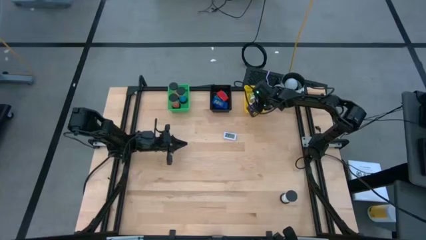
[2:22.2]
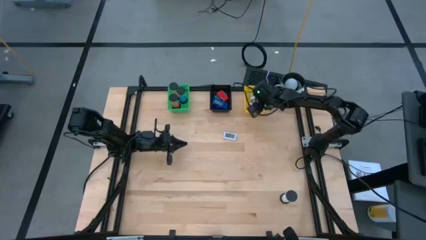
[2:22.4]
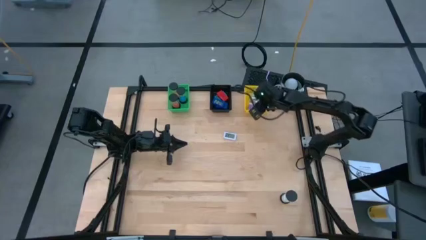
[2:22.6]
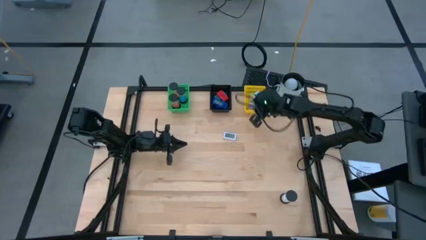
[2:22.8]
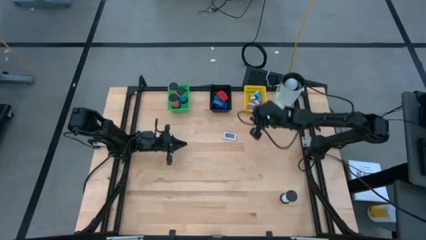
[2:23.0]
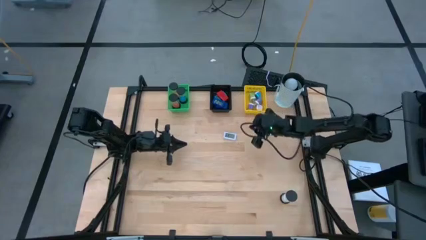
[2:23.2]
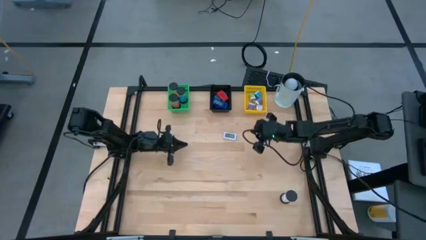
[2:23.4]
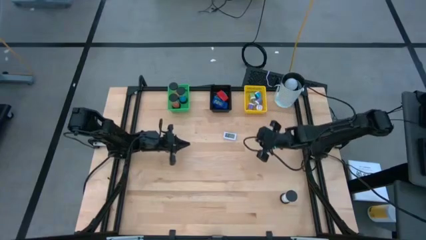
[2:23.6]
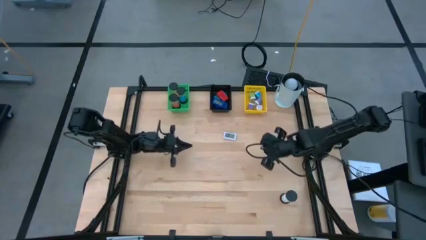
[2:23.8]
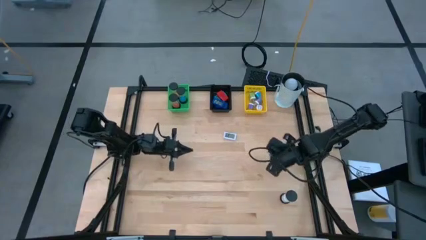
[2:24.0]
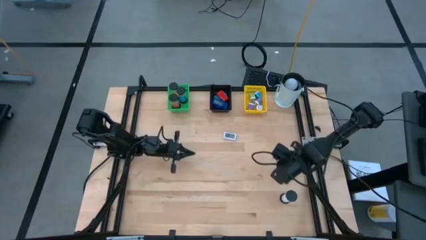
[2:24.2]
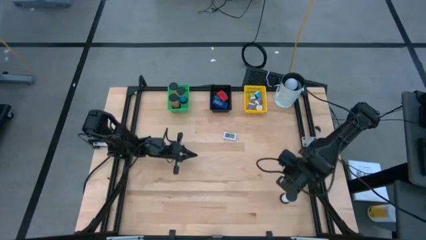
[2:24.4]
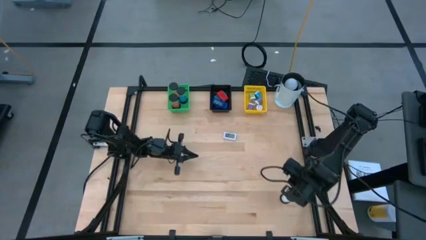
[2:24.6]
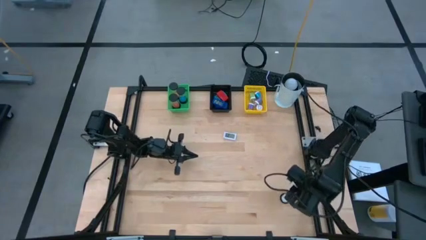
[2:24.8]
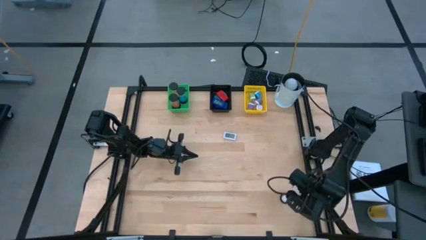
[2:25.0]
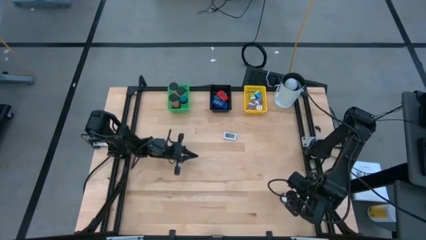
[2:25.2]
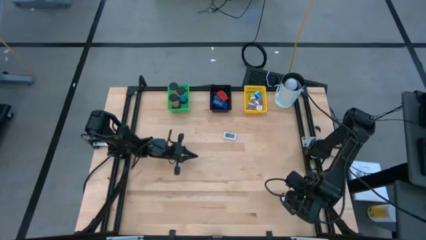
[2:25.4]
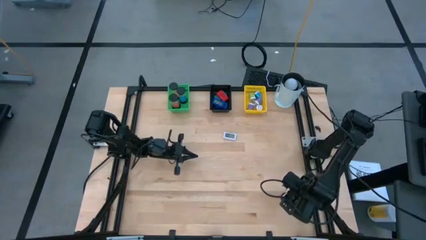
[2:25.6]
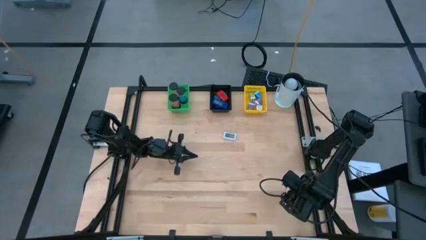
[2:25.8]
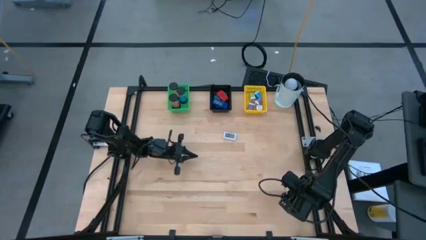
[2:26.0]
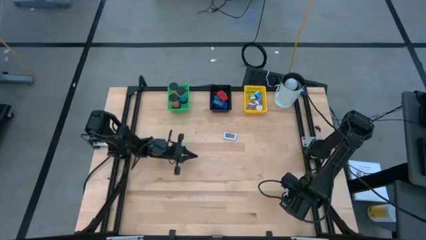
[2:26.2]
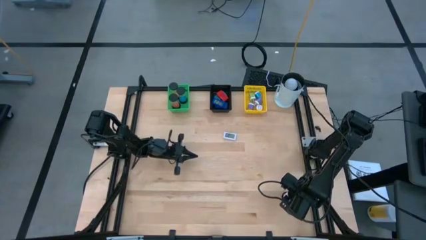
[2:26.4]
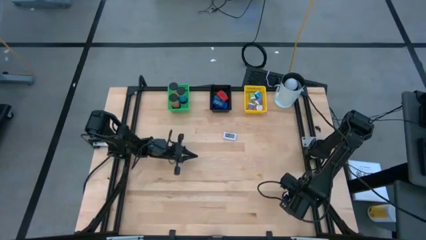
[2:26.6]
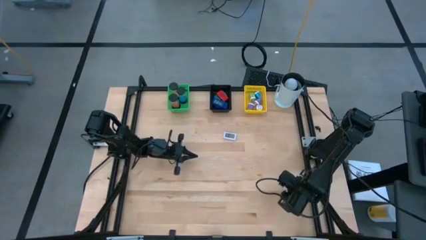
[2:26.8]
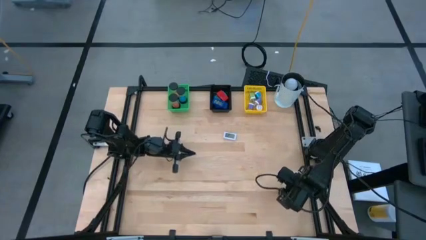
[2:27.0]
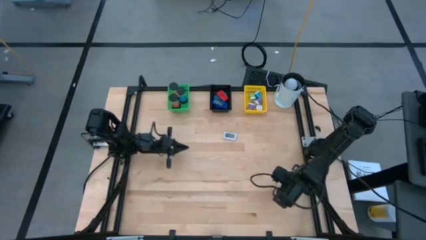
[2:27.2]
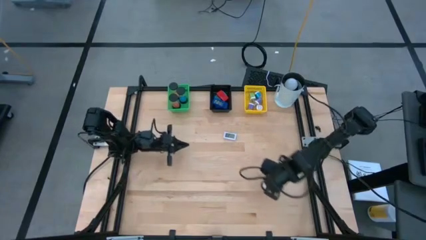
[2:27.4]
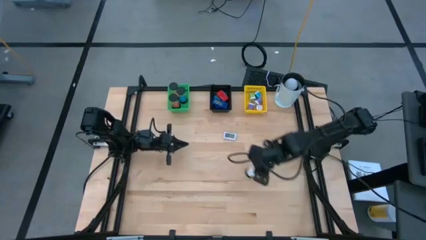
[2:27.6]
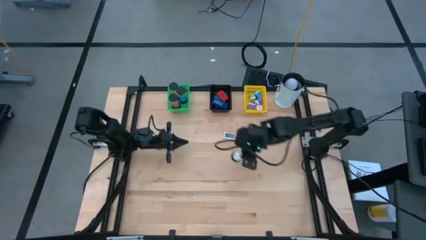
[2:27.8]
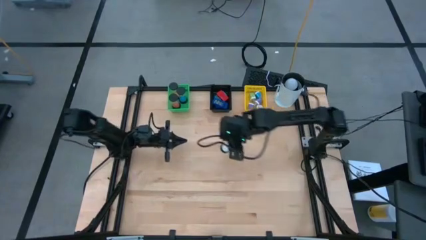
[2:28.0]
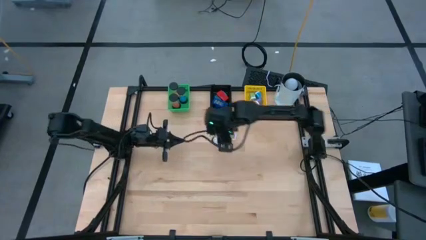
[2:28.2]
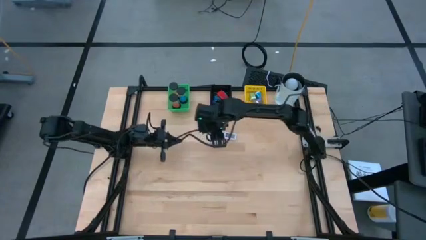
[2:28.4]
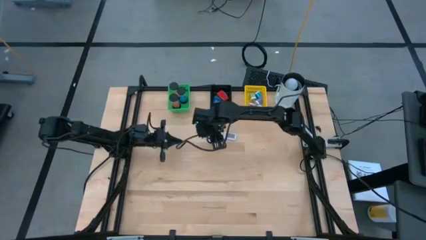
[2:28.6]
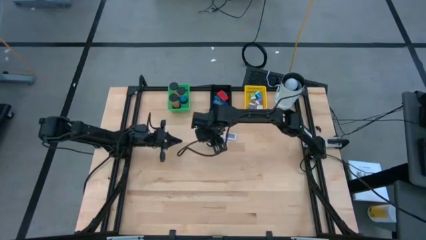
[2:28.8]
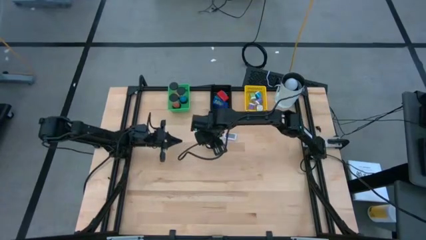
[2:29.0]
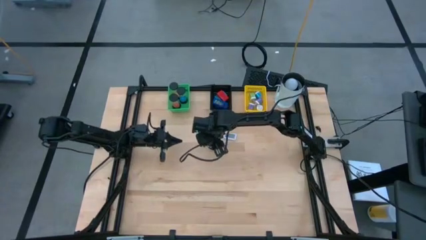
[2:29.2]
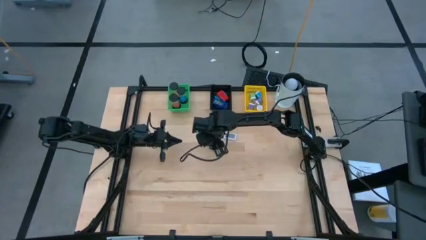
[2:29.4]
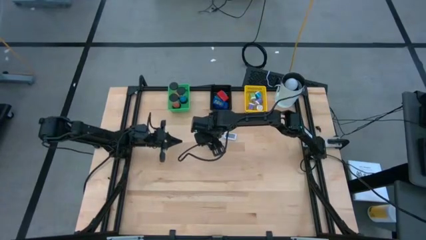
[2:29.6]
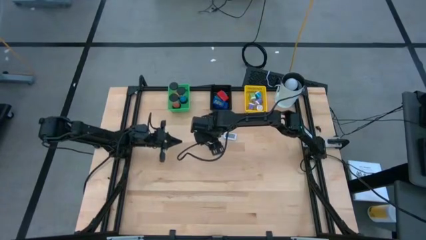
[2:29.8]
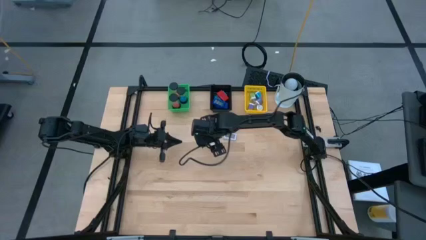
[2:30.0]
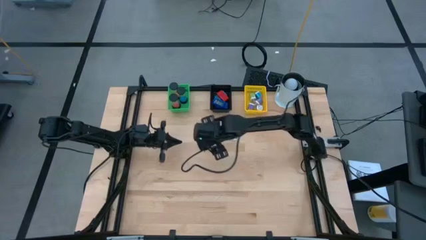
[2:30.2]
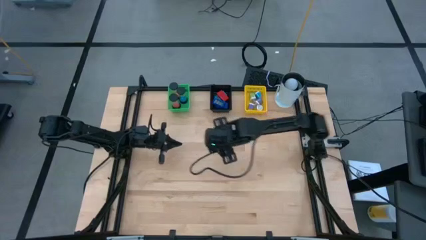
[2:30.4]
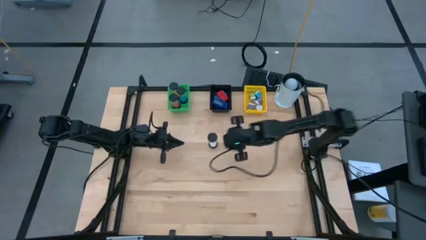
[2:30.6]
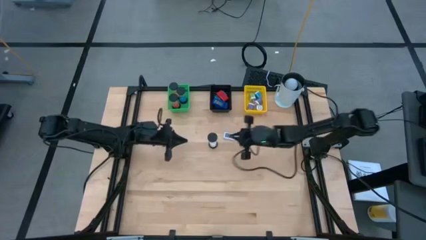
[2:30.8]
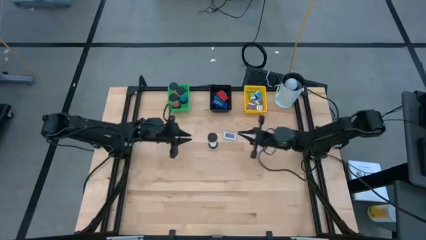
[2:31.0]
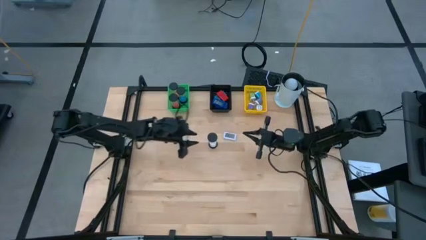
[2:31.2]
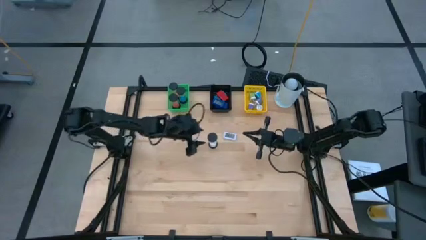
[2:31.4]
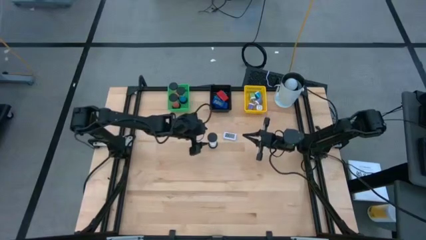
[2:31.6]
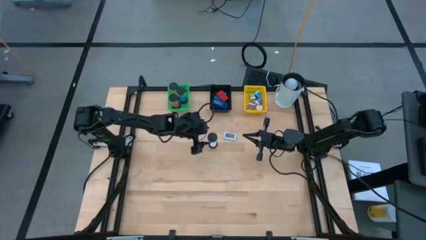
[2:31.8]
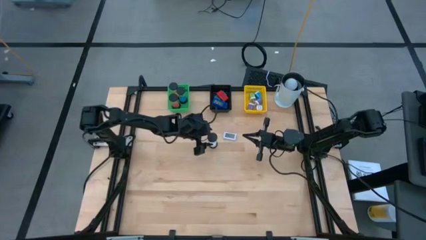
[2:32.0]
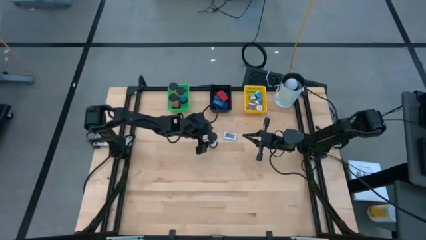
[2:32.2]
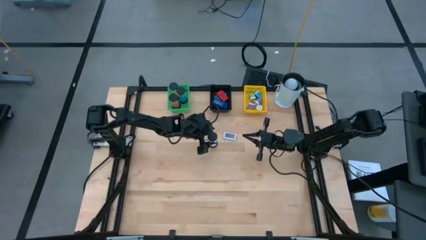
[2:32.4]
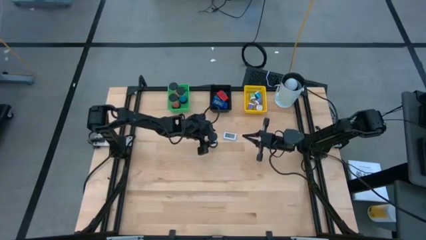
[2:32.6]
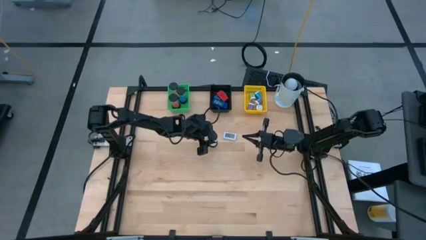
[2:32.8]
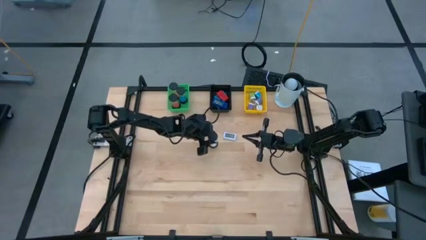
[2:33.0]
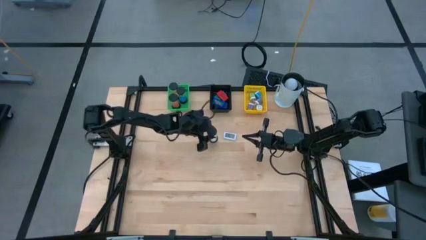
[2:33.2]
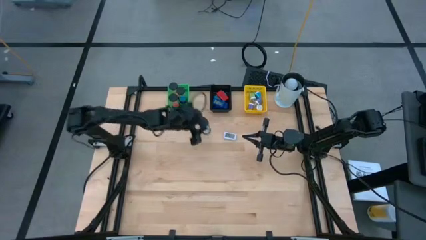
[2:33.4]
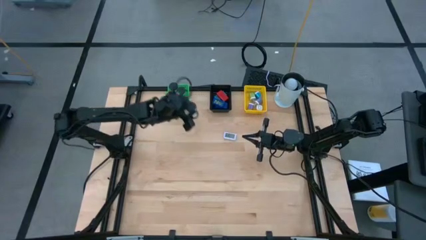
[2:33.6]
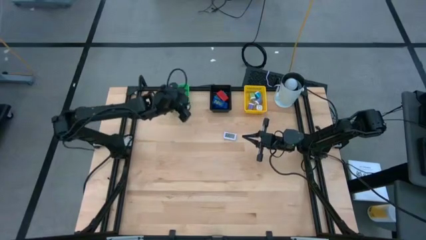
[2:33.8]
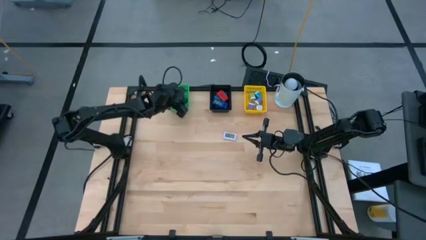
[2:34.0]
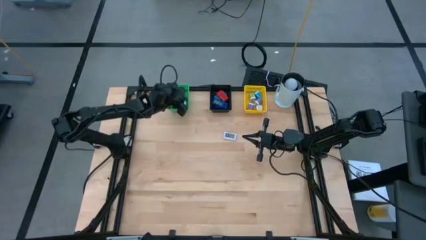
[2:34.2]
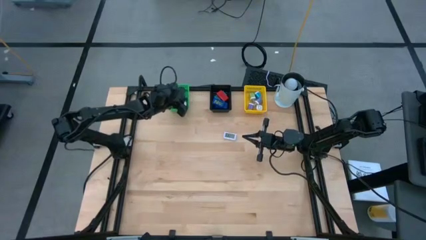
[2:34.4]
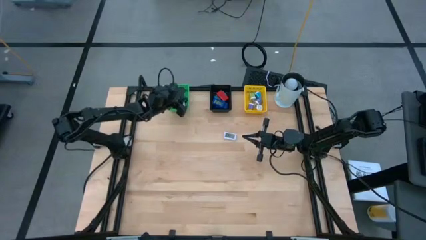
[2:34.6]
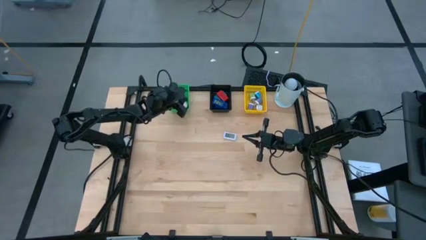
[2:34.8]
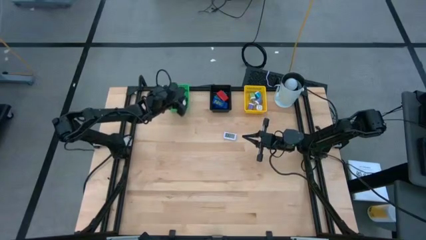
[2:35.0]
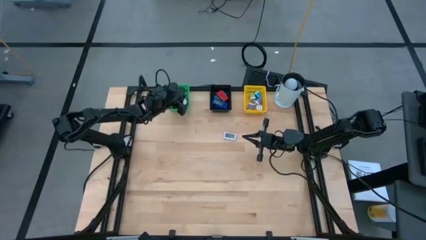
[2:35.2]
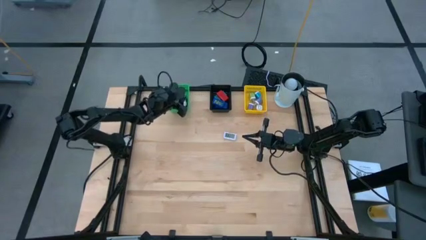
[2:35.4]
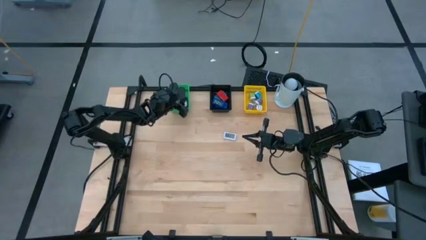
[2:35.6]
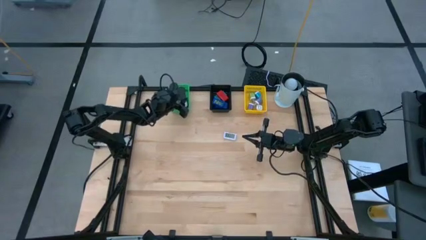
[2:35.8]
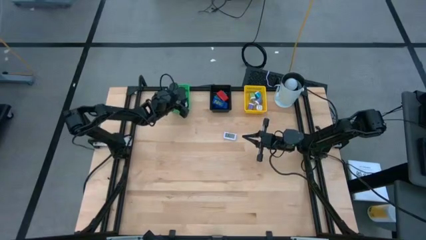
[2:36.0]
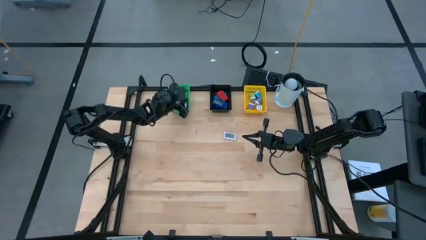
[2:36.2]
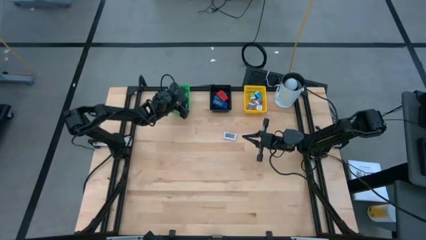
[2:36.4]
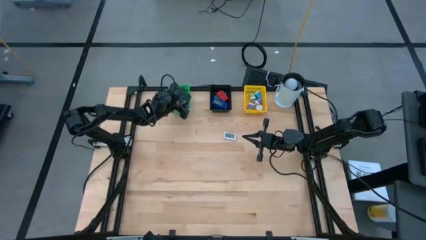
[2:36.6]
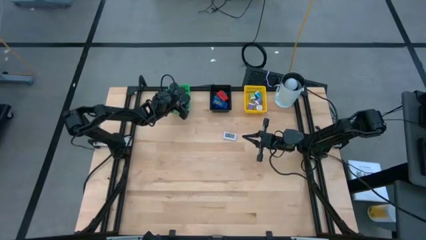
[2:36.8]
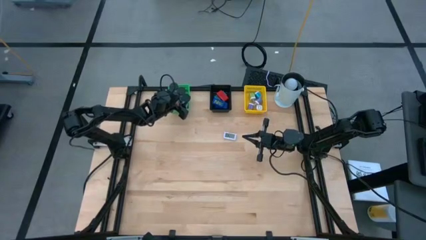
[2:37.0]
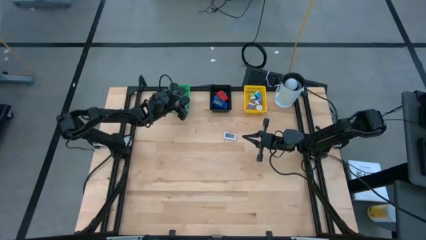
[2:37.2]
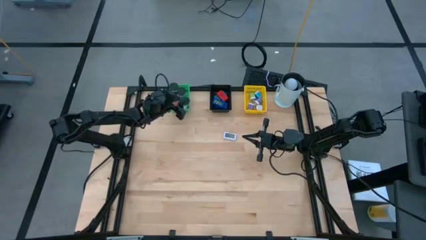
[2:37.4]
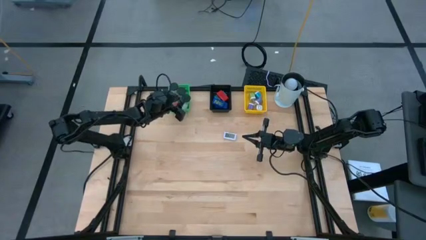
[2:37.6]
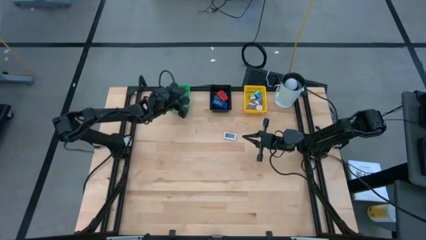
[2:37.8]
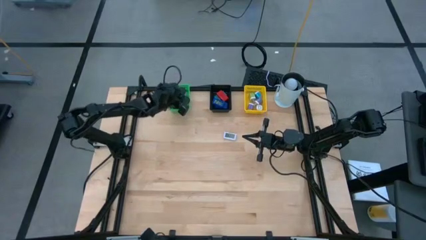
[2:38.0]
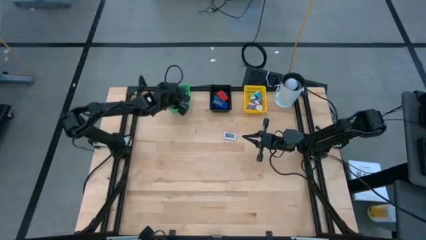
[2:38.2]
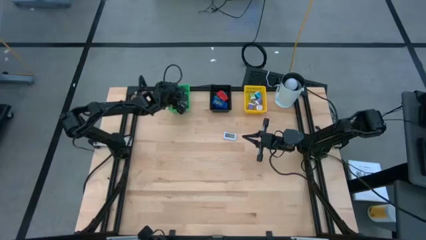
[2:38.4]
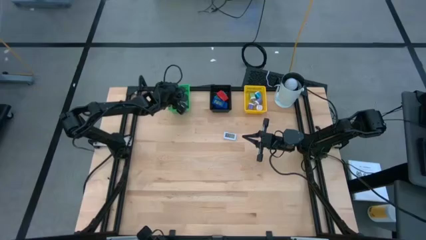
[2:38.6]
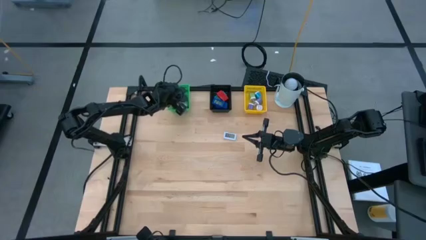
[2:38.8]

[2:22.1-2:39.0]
Task: Pick & Place Office items
Put the white hourglass into the green bin

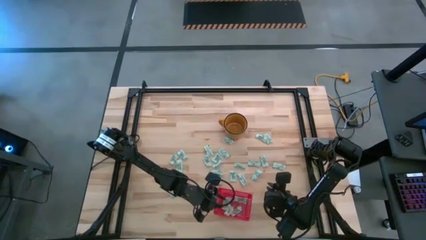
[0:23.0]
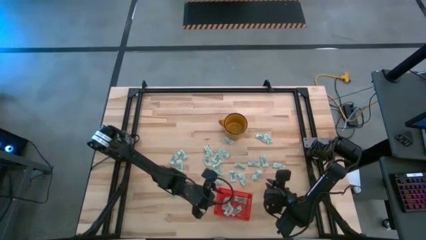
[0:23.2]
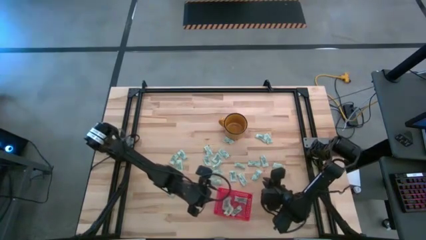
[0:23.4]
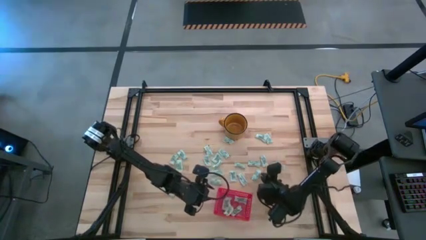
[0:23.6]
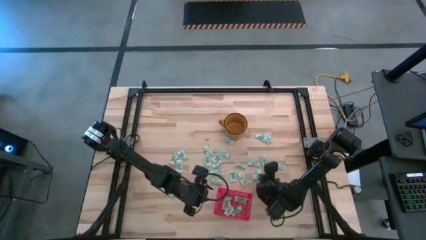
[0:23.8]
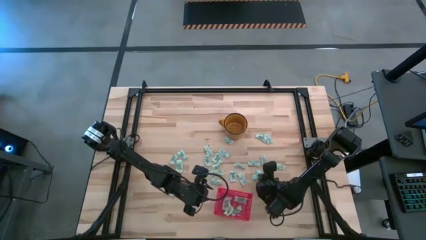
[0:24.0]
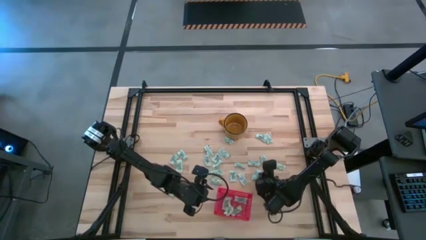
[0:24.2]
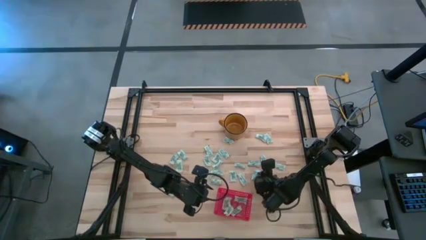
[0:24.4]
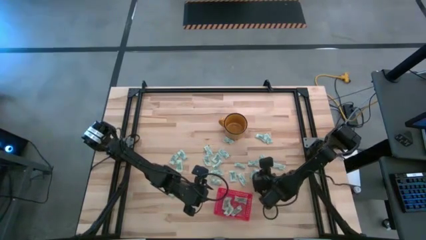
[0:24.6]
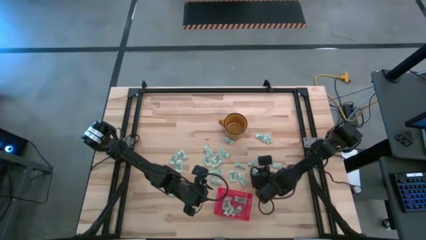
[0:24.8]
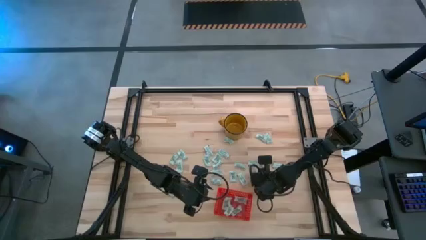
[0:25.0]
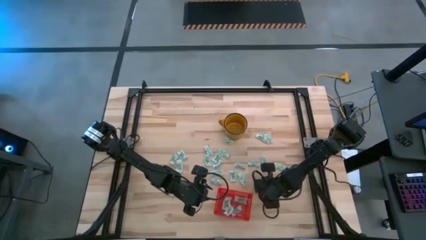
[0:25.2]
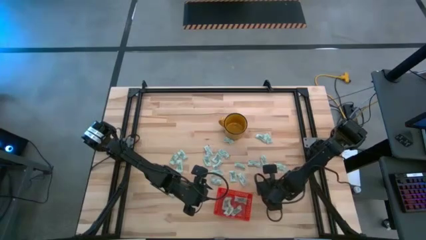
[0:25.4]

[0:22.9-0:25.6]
Task: Pick and place Stevia / Truvia into bins
Put the stevia packet into the bin
